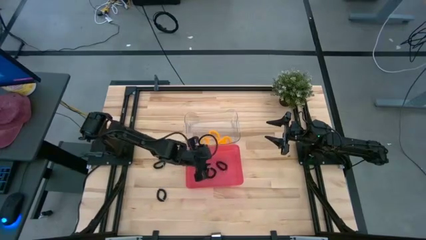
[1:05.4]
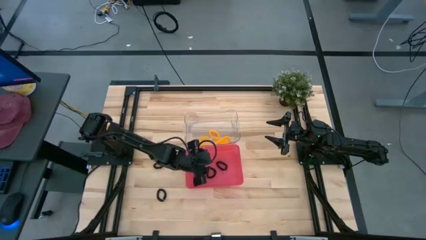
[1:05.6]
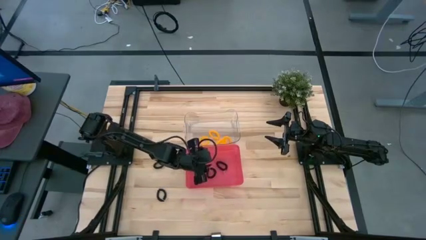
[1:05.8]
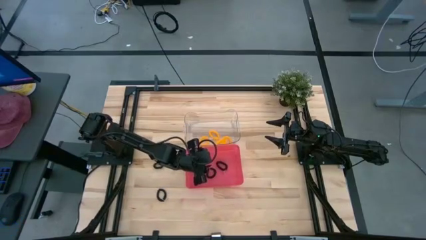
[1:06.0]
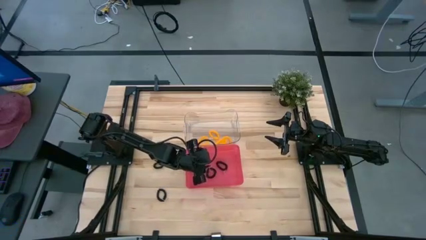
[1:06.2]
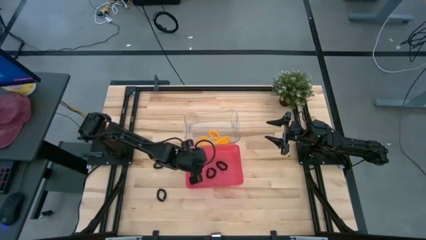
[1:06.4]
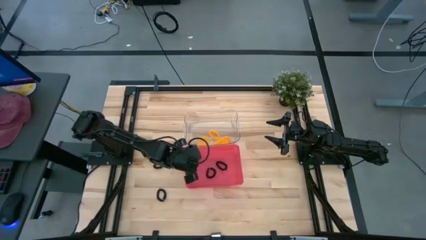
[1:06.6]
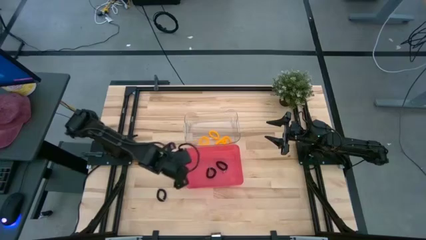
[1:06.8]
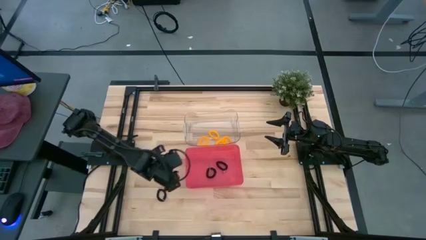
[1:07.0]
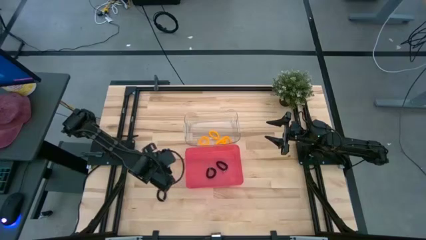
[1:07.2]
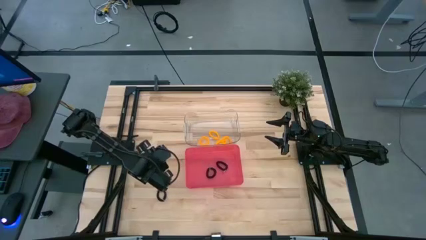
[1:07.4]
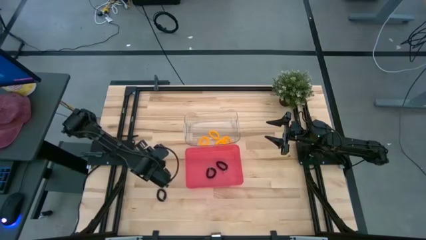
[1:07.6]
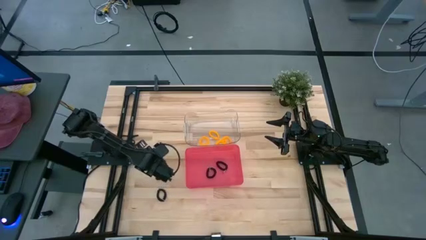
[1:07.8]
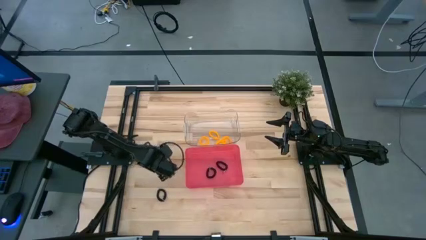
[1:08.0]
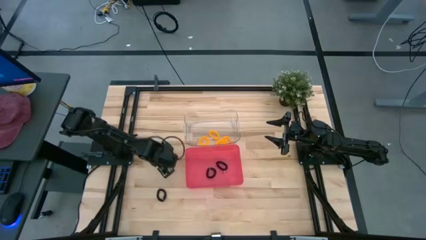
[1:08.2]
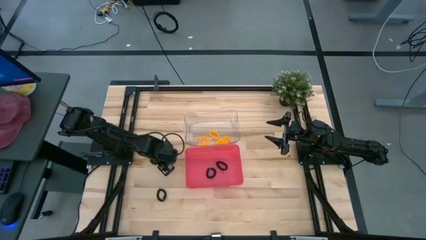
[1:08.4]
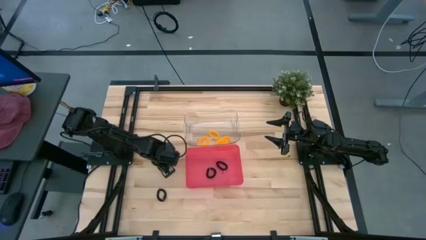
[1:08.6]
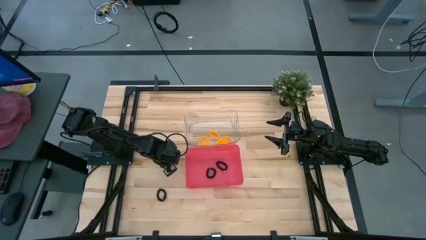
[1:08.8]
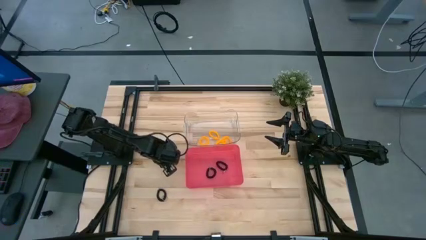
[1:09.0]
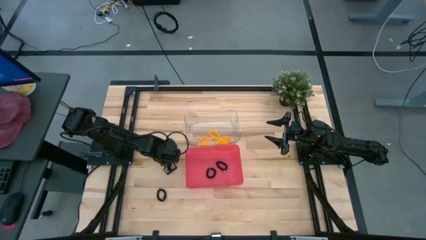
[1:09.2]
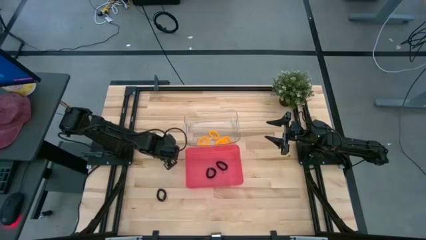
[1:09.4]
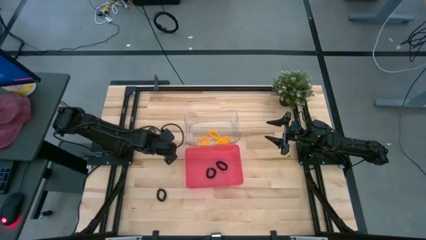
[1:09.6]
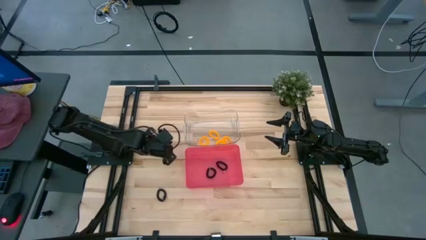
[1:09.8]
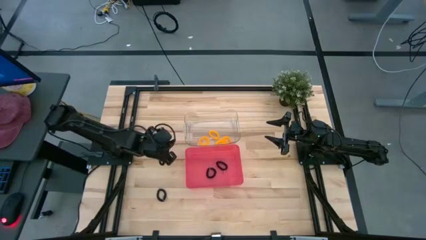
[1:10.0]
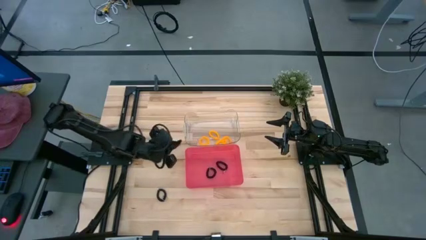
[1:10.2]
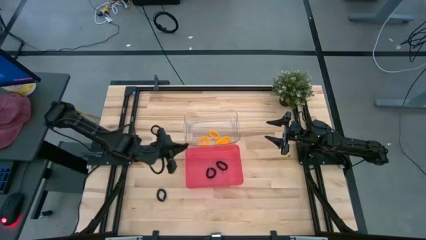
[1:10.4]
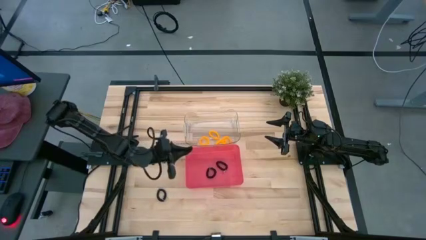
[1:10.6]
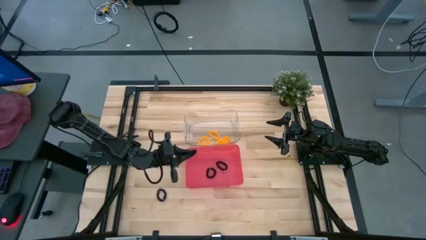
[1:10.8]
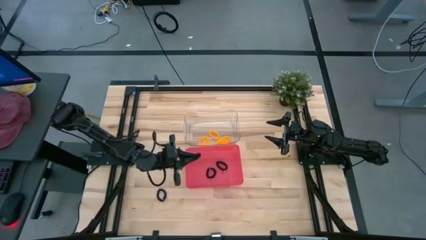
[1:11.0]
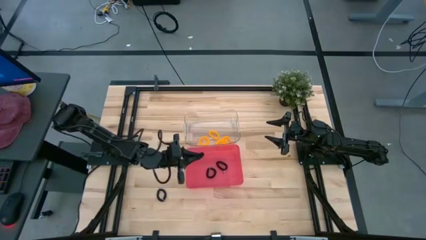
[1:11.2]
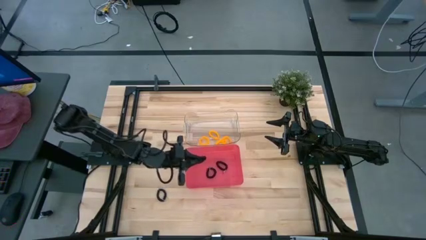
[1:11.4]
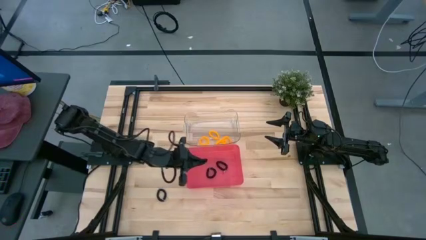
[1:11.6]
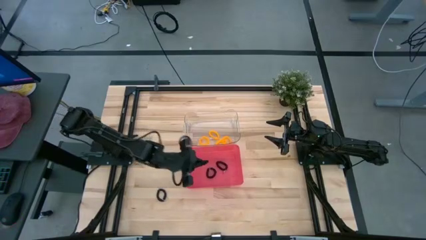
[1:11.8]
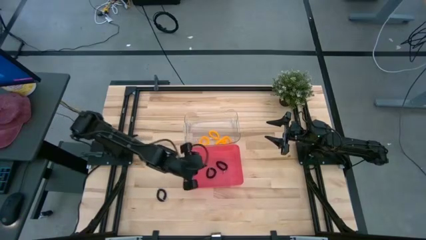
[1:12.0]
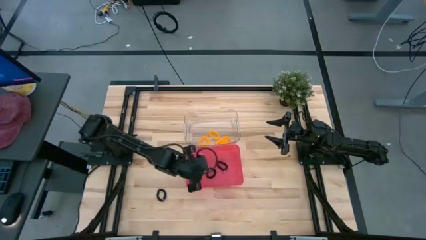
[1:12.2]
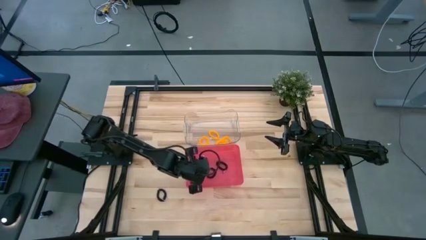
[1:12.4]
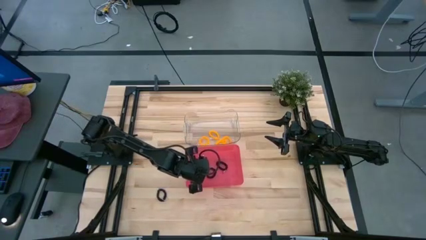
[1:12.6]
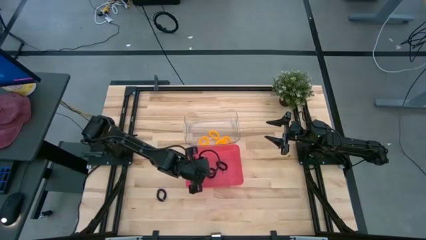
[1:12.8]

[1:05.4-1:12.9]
Task: Sort spring keychains
Put the black spring keychain into the red bin

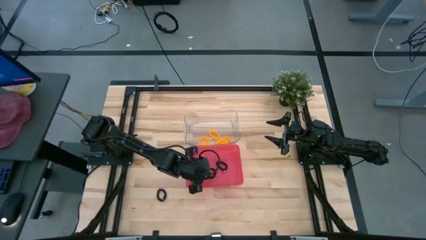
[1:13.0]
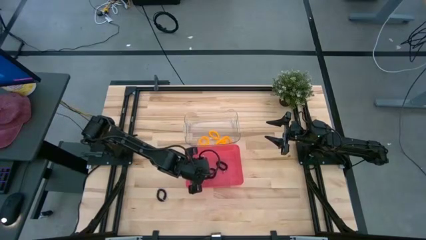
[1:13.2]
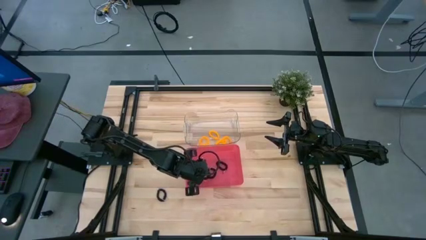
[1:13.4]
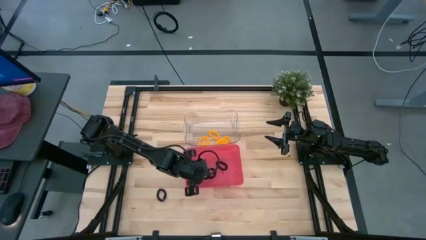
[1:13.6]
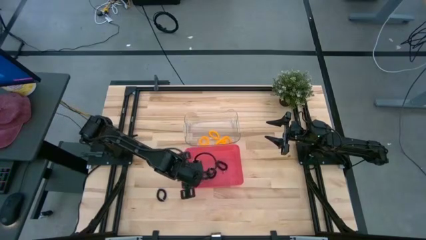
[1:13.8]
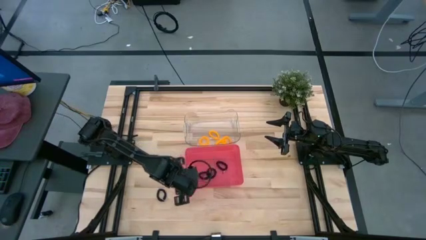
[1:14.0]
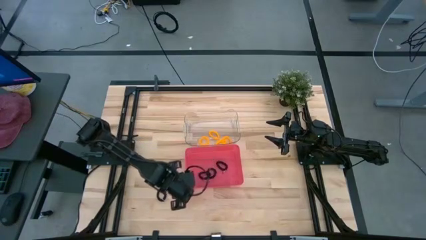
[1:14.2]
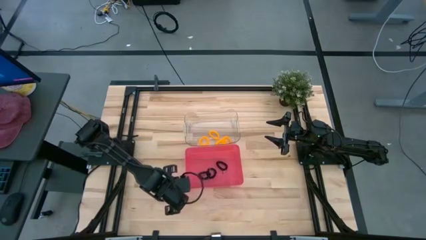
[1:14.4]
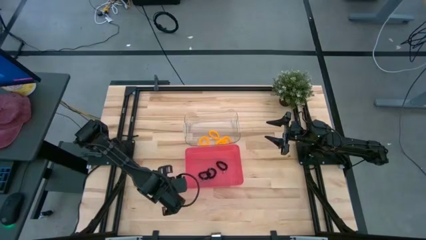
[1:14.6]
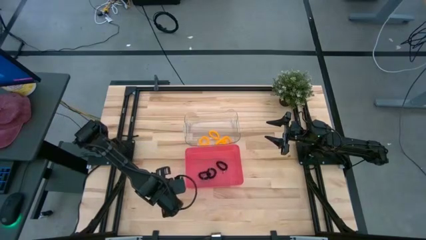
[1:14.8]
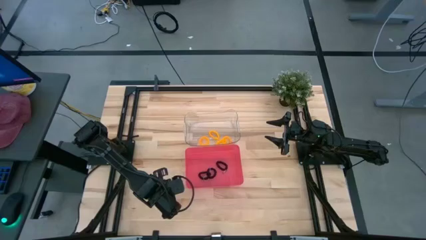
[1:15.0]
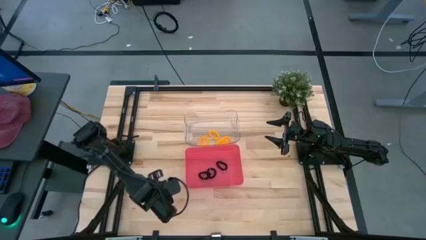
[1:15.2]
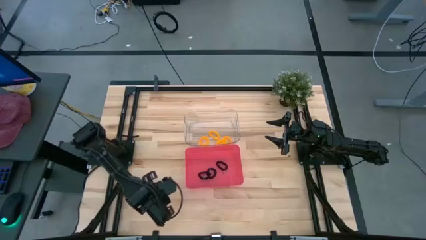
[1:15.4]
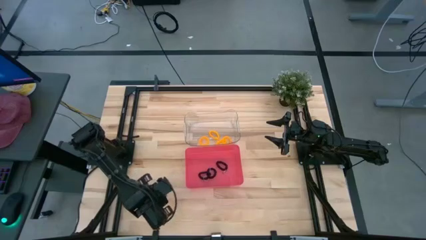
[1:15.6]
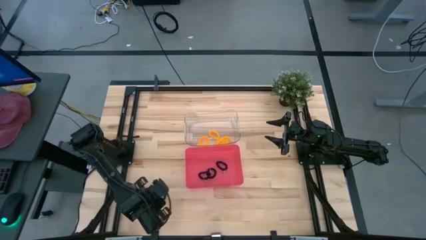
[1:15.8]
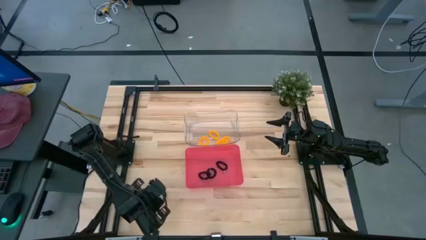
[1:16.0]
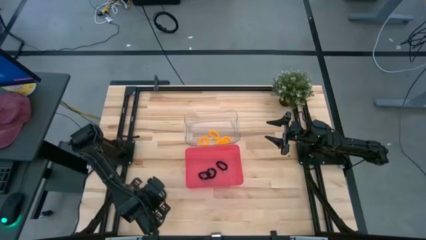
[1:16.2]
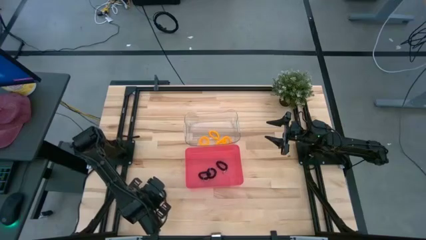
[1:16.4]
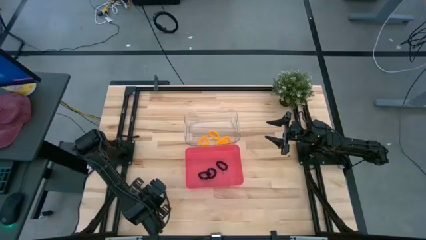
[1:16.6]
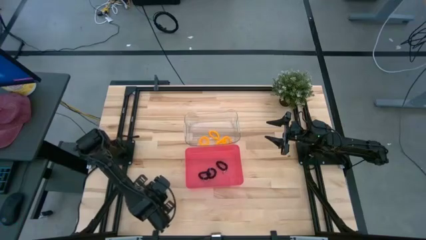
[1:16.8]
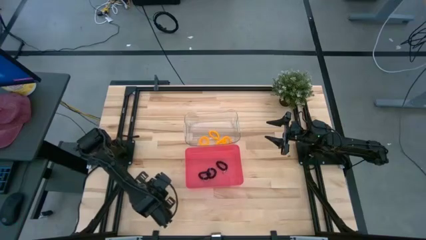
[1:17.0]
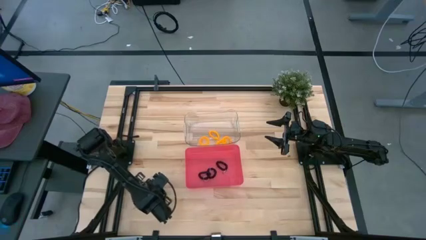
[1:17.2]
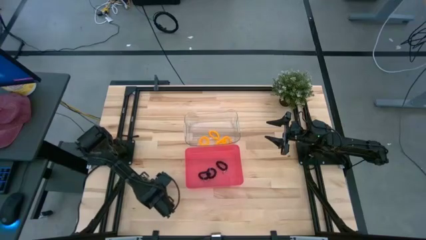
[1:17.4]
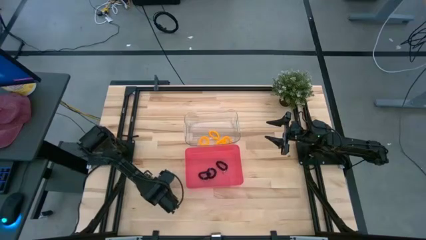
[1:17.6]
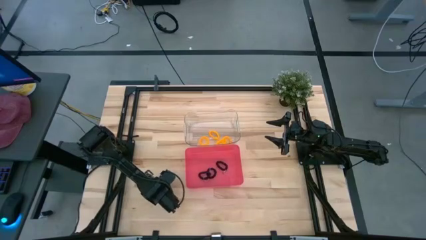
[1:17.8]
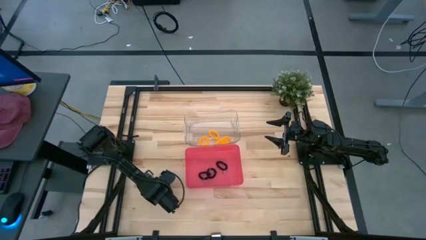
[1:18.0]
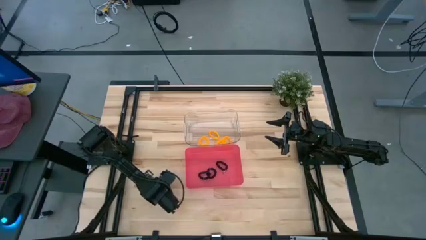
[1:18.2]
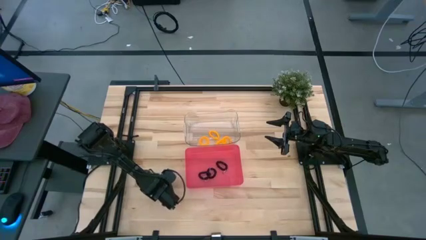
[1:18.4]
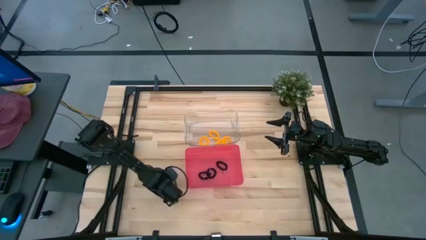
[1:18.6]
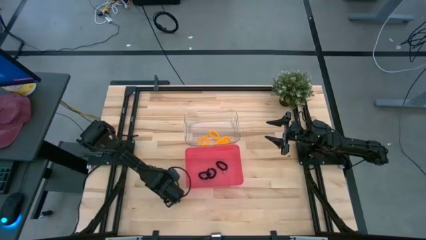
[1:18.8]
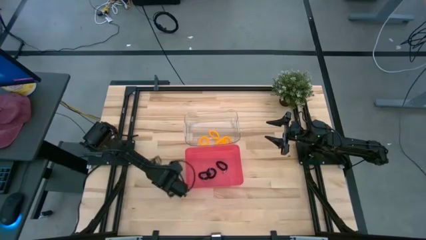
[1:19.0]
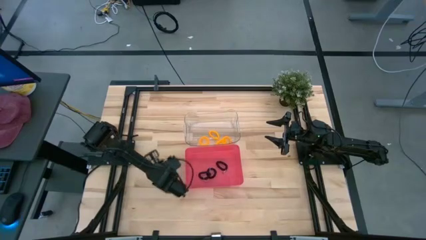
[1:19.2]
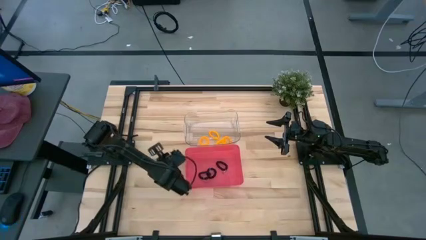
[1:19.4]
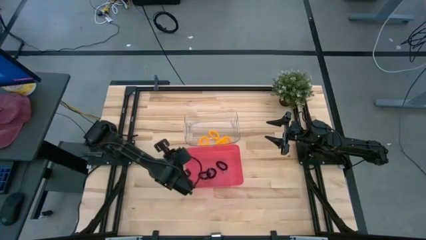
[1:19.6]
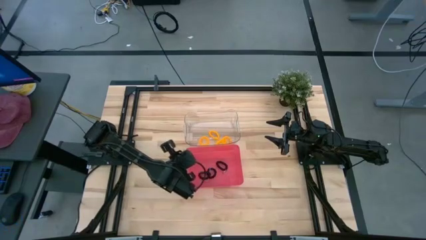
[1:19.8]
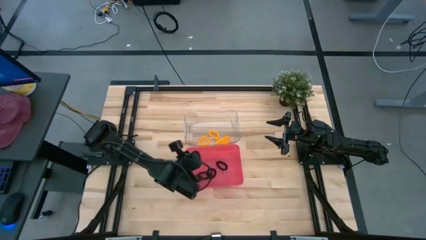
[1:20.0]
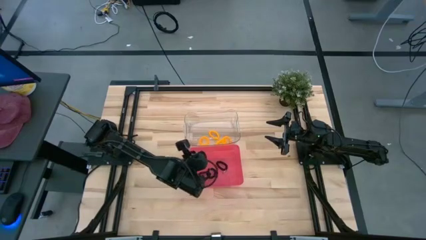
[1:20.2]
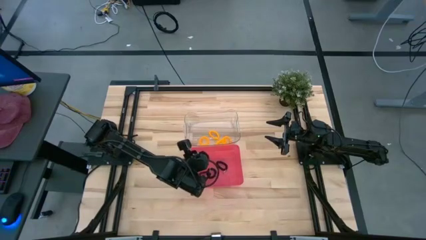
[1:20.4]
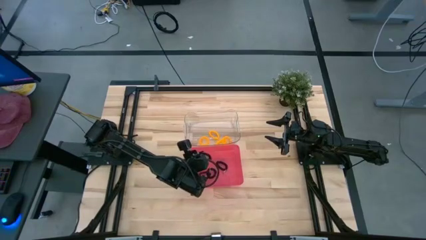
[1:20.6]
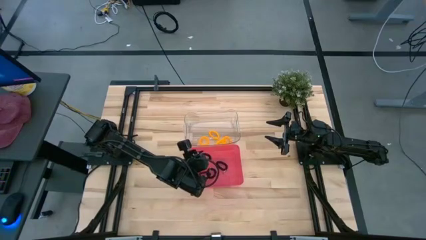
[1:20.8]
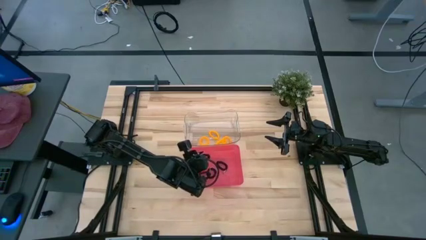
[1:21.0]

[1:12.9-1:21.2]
Put the black spring keychain into the red bin
